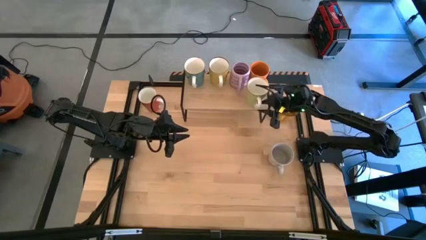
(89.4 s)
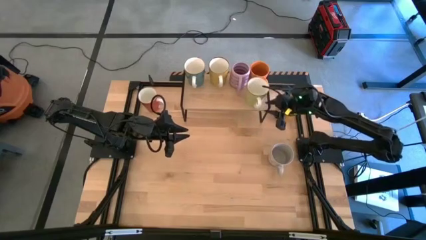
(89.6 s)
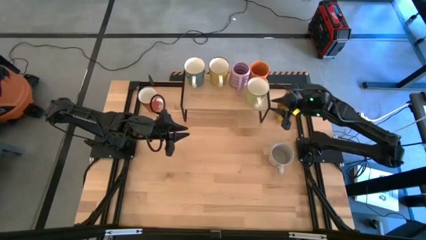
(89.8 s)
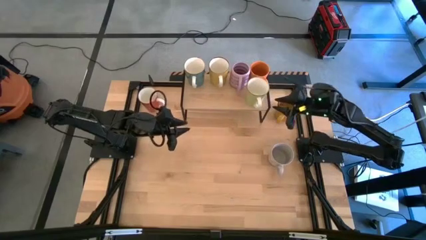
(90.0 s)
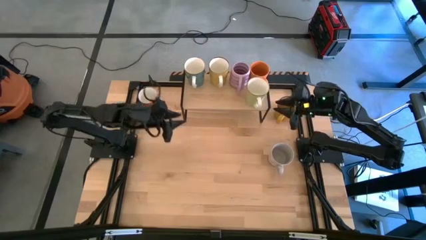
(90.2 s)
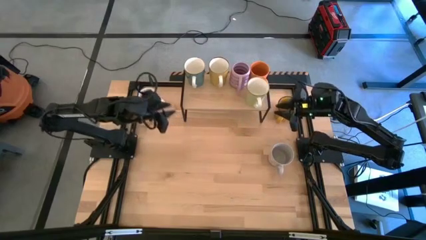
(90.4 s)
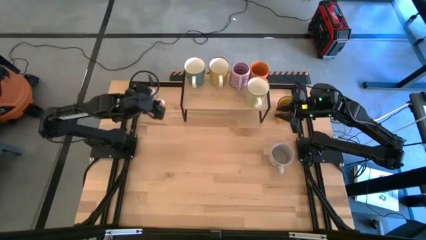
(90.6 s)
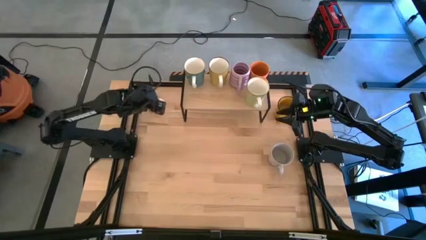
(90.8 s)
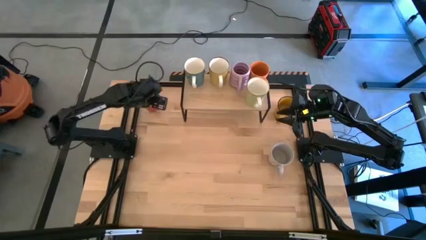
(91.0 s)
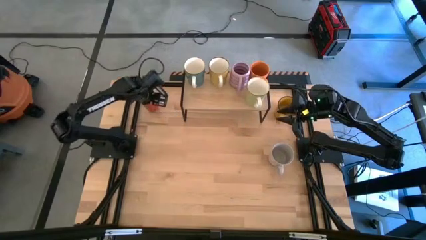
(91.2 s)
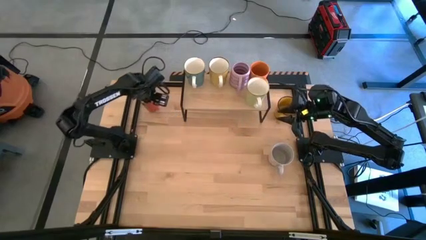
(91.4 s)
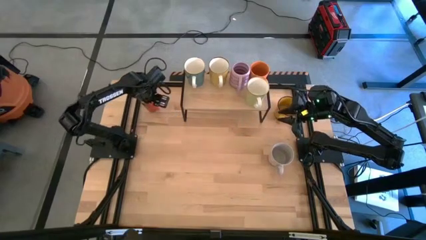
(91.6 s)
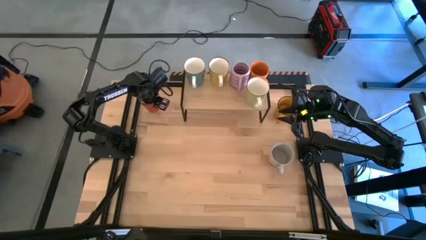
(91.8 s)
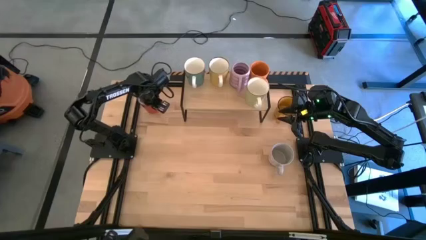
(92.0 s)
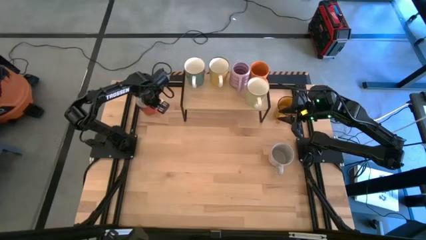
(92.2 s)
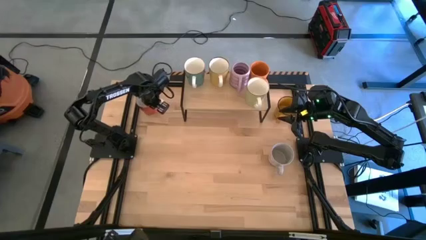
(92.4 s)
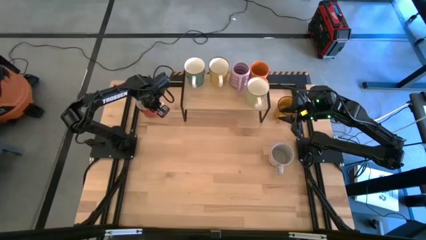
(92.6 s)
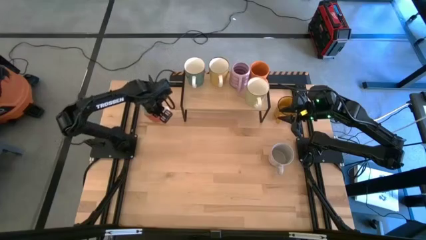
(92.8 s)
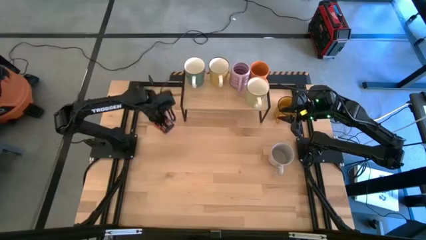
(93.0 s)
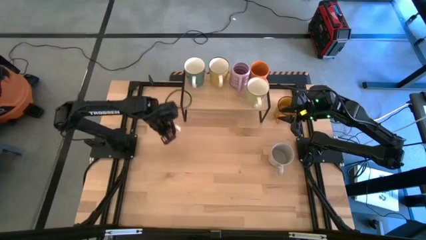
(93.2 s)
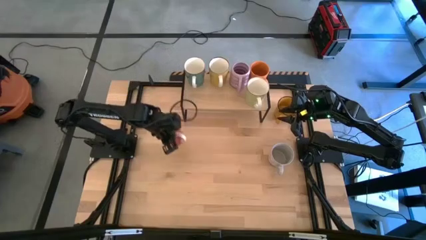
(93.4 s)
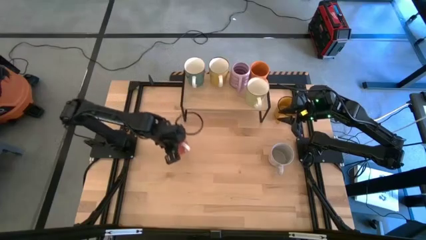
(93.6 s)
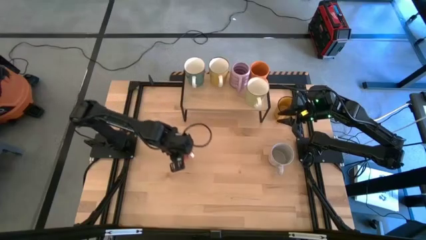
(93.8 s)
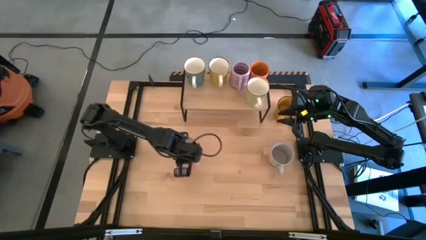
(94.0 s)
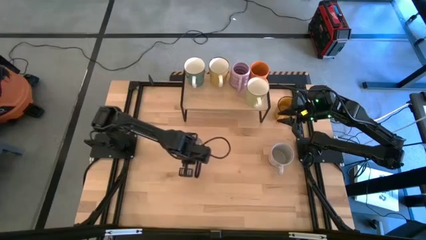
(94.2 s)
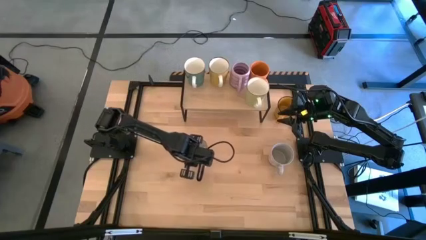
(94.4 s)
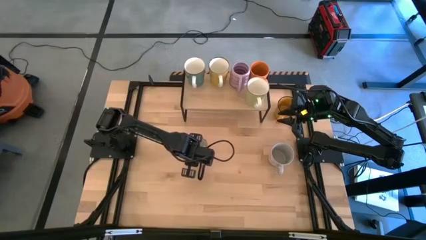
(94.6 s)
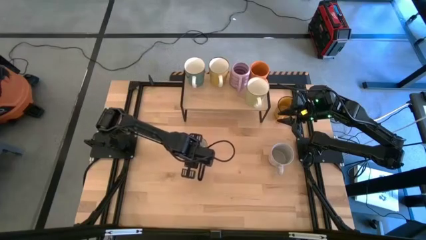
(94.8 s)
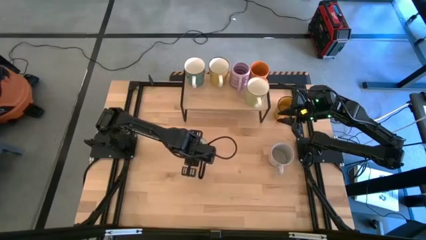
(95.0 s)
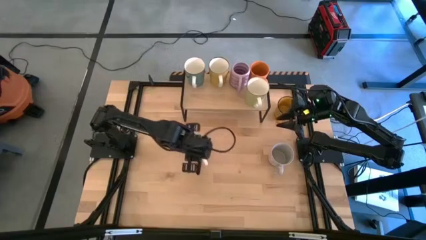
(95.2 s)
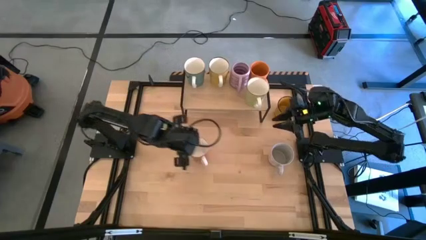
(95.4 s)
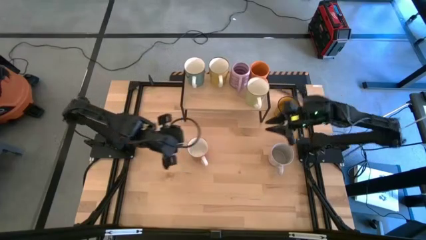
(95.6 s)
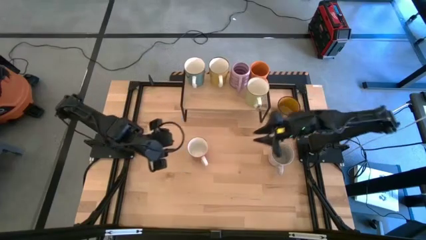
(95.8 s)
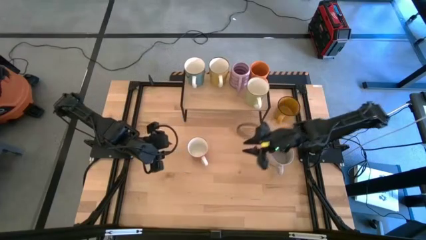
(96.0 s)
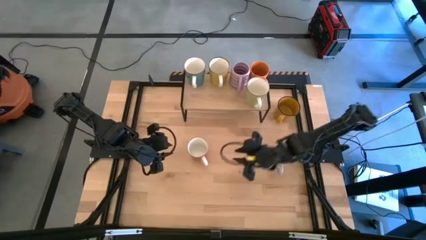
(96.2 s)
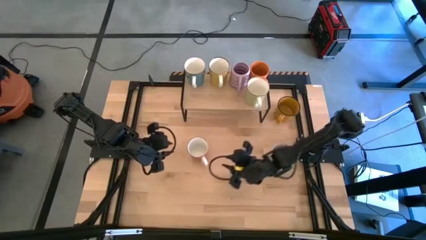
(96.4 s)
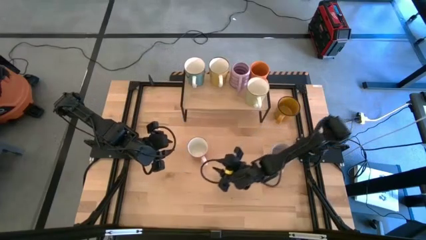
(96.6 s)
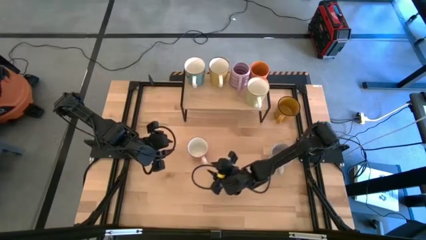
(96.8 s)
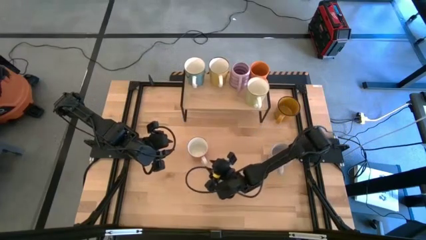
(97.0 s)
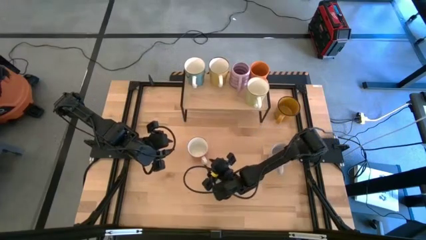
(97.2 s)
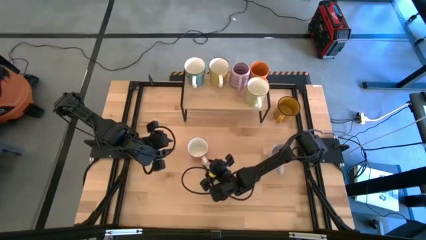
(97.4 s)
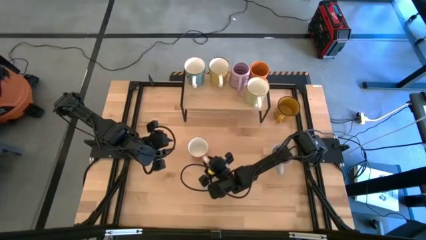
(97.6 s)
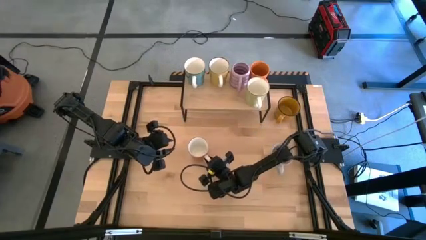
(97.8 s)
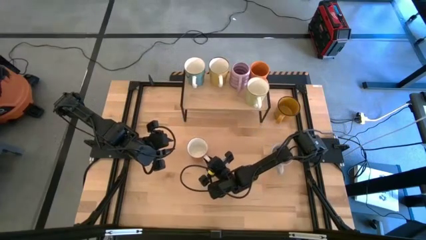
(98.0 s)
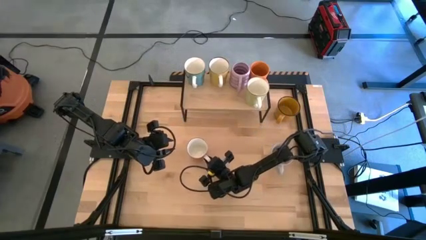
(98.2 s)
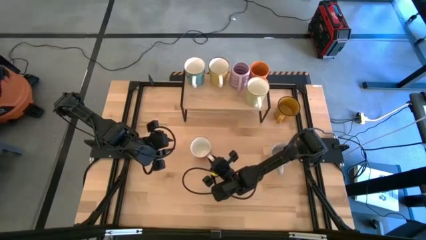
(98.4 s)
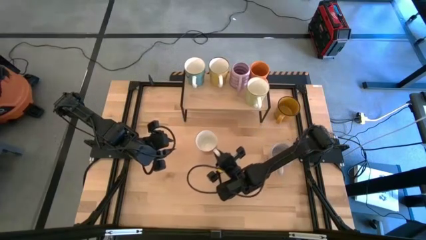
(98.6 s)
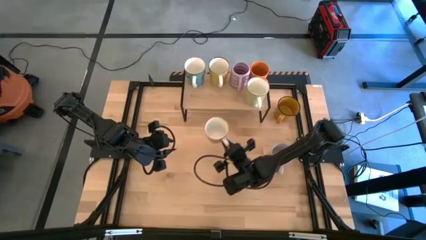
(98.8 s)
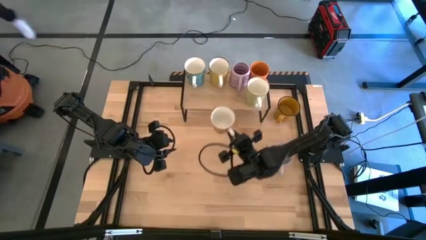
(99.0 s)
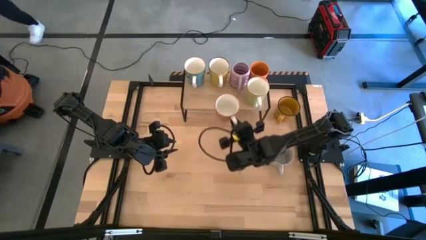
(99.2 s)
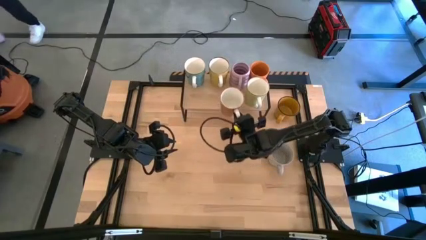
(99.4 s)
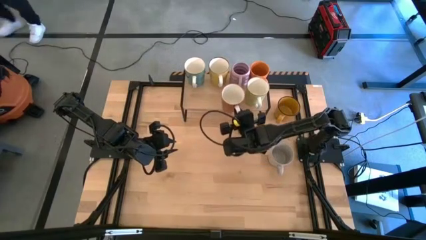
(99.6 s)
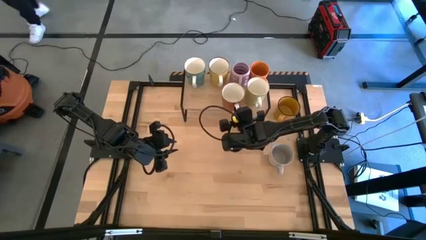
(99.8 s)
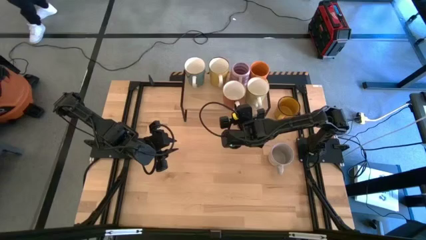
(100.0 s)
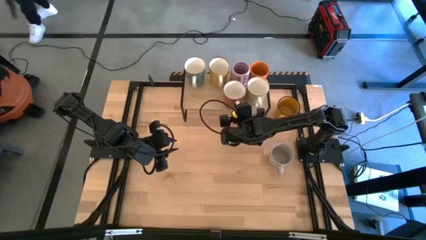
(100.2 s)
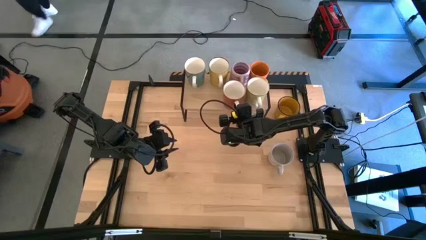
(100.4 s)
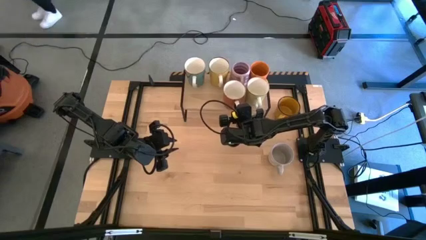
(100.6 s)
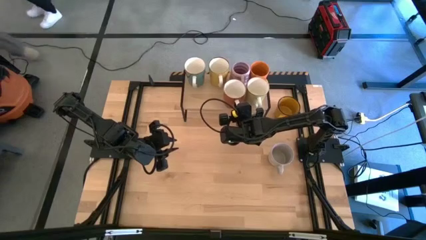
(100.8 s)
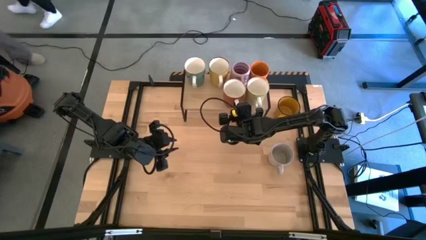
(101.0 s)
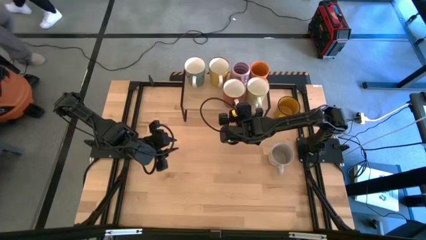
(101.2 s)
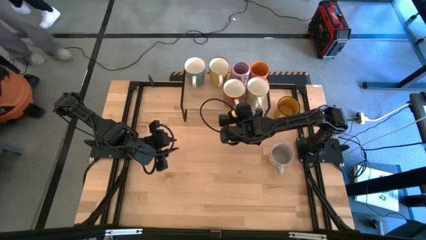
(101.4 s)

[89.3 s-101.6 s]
Task: Place coffee mugs
Put the red mug on the shelf

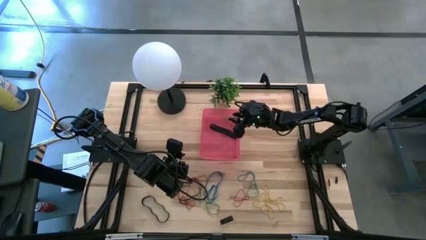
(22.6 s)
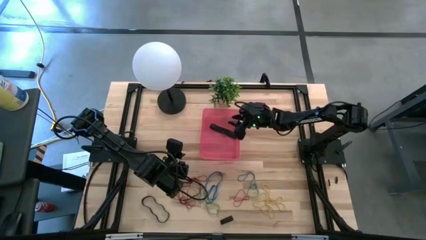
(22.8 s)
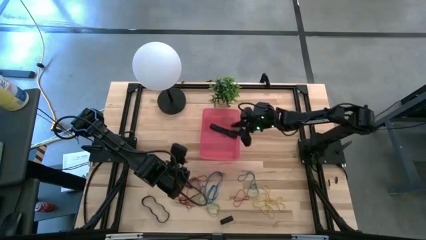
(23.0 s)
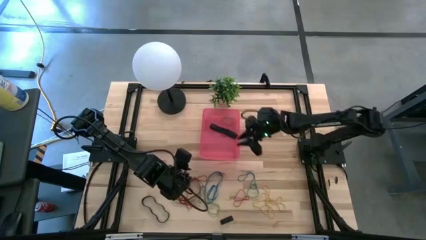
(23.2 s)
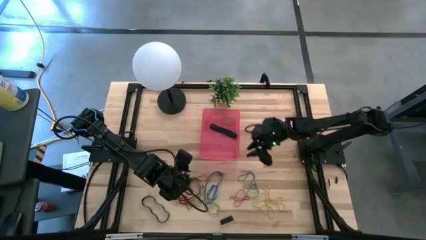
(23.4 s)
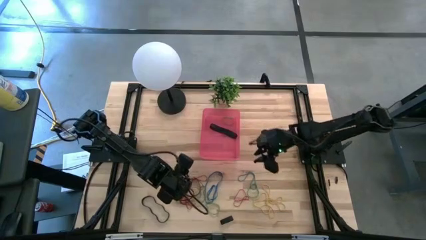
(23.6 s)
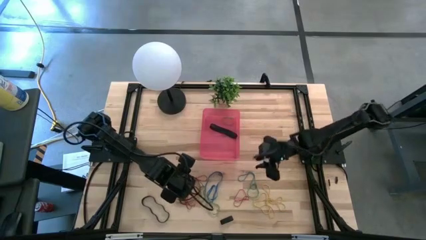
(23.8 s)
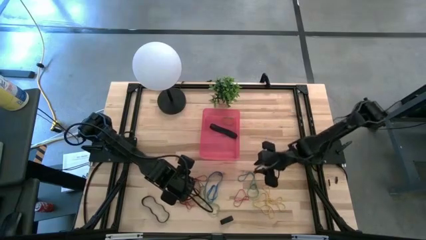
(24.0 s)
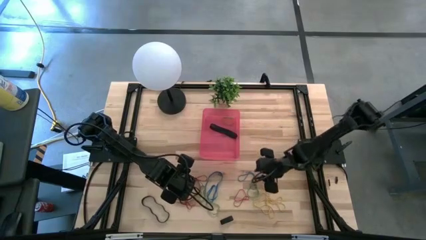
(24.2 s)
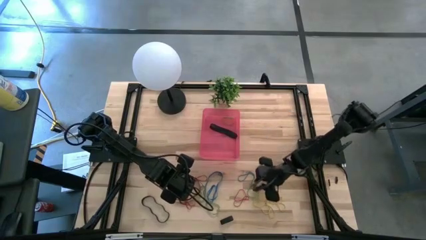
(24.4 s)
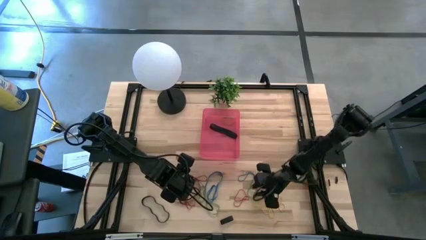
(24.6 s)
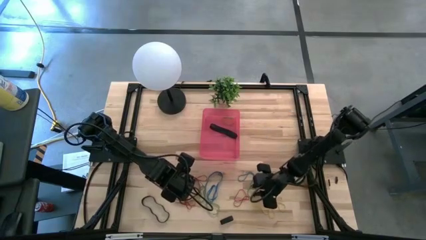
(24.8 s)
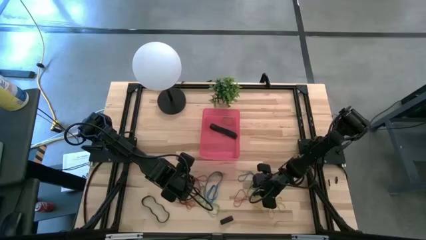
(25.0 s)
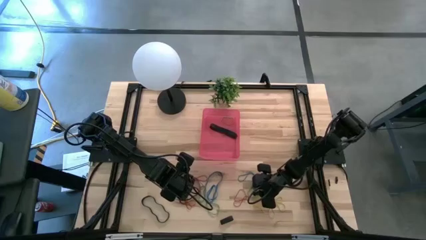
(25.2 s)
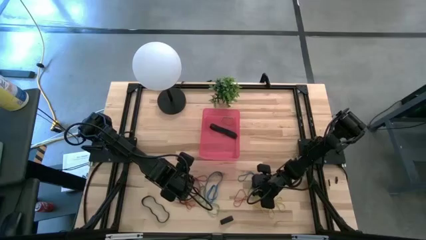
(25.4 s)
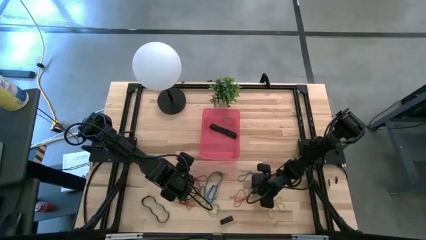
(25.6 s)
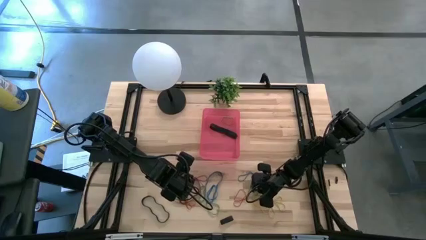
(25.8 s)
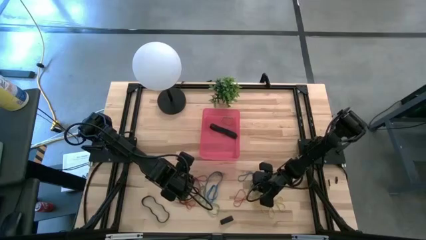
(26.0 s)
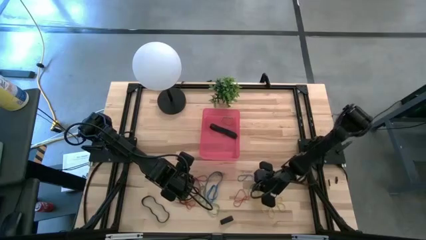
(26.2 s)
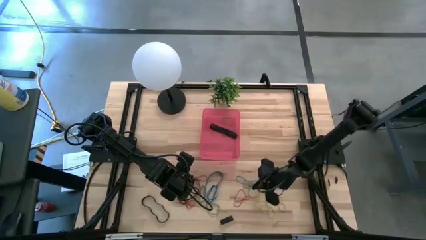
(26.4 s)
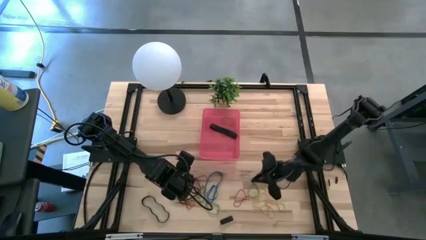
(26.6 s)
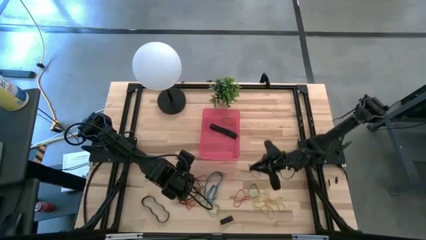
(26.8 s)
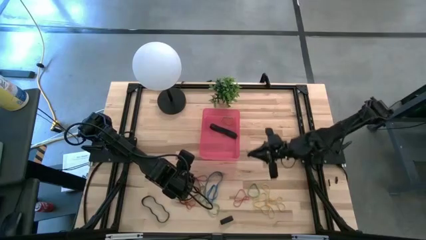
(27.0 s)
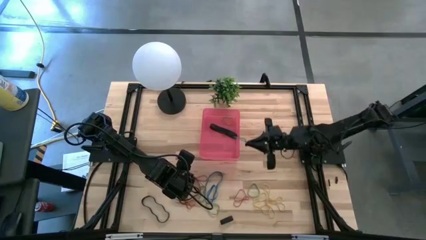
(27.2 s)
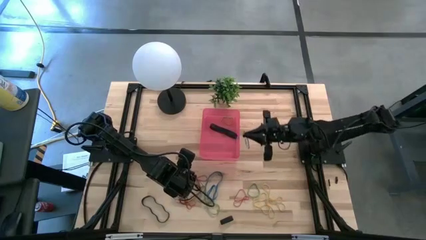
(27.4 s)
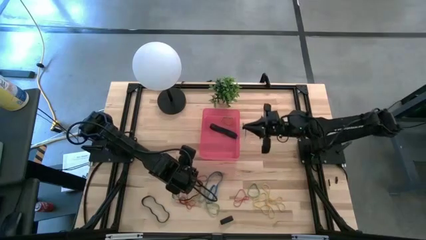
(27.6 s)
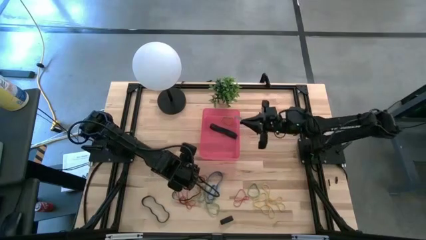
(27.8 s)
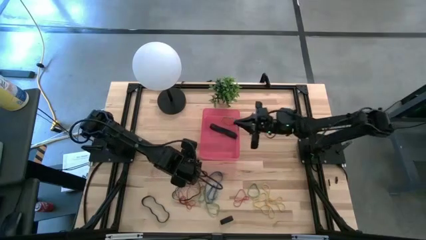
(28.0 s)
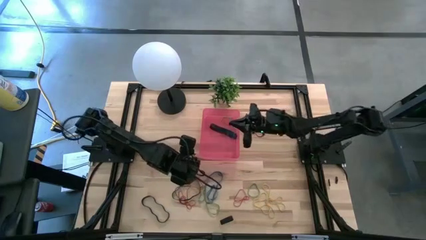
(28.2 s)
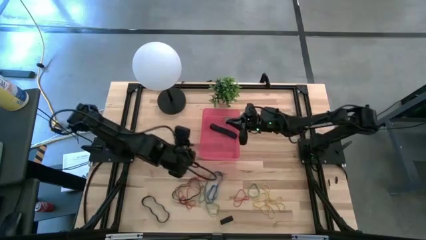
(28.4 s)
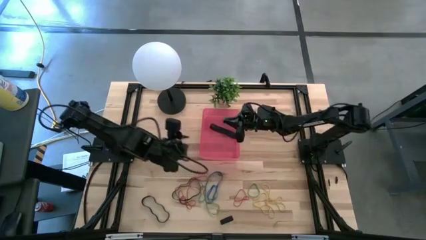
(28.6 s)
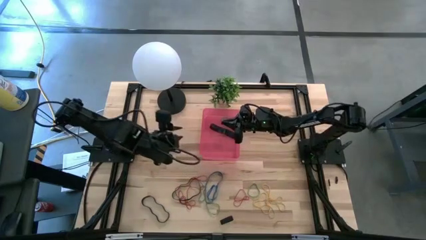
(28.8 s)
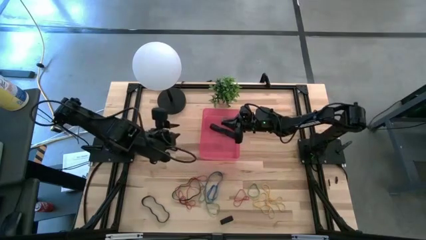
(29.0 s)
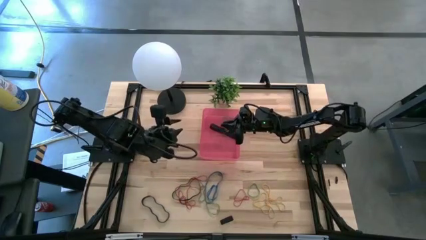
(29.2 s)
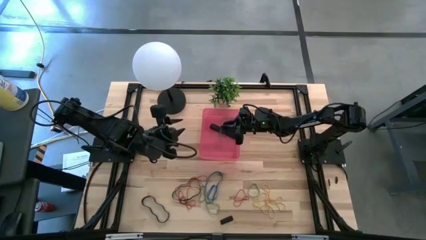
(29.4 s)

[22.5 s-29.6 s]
Task: Pick and place rubber bands into bin
Put the blue rubber band into the red bin
